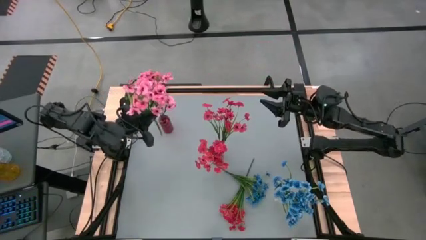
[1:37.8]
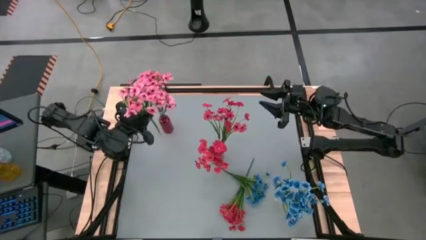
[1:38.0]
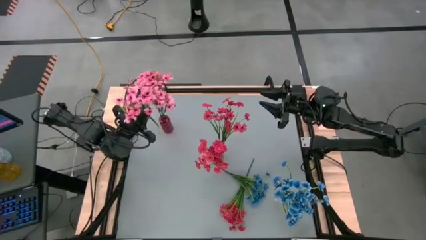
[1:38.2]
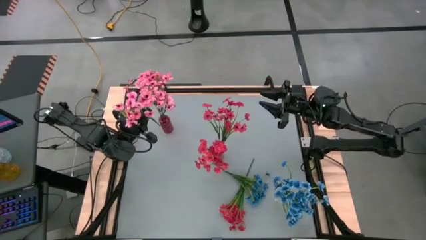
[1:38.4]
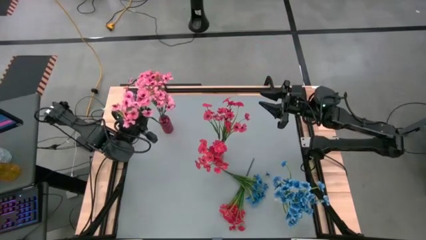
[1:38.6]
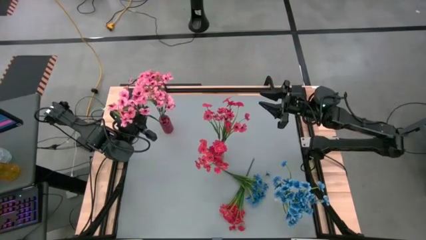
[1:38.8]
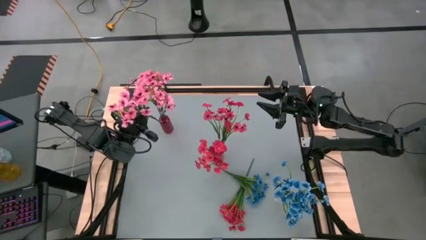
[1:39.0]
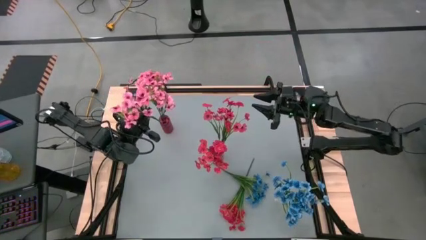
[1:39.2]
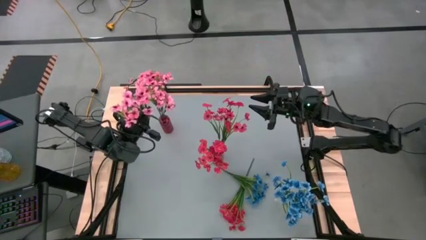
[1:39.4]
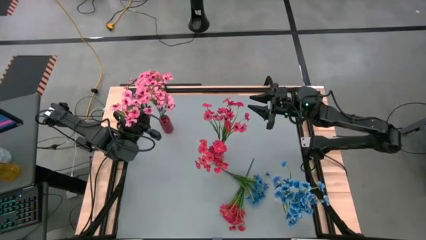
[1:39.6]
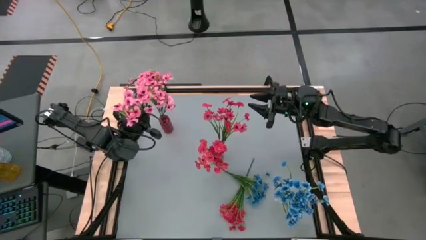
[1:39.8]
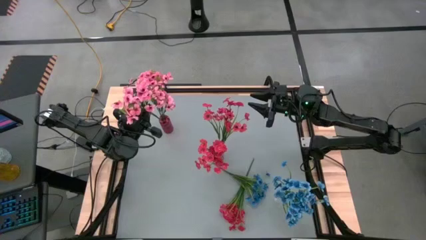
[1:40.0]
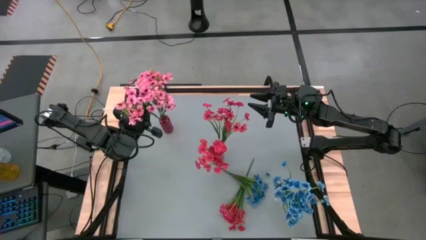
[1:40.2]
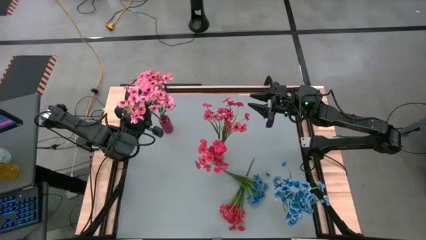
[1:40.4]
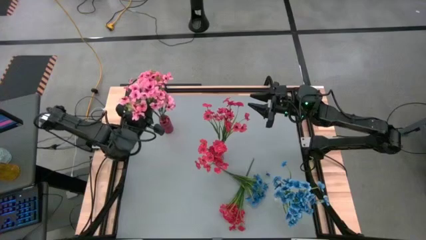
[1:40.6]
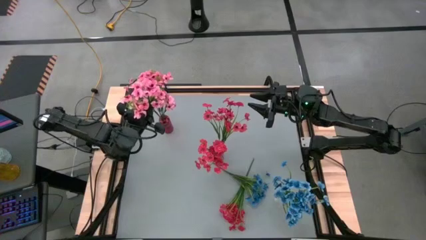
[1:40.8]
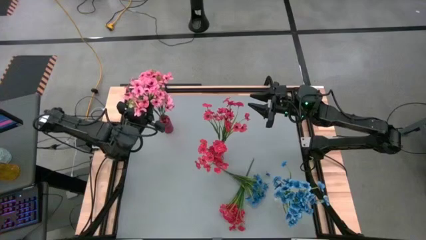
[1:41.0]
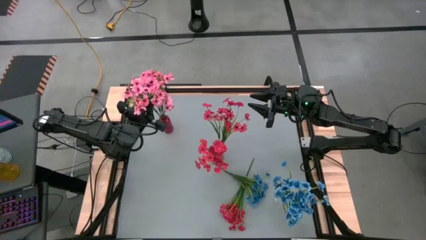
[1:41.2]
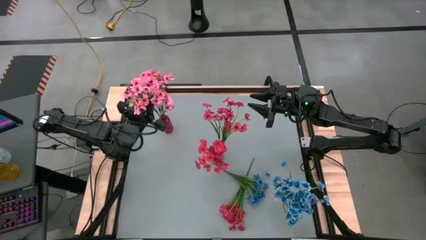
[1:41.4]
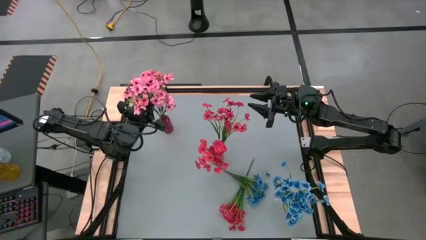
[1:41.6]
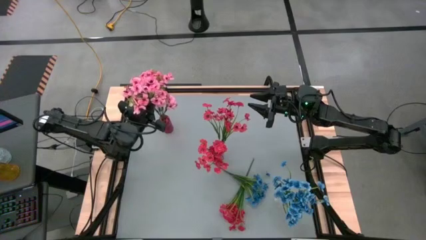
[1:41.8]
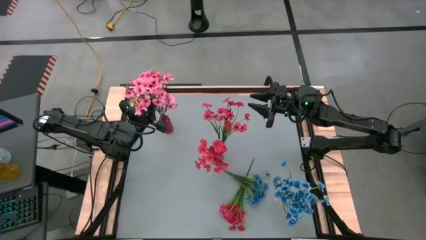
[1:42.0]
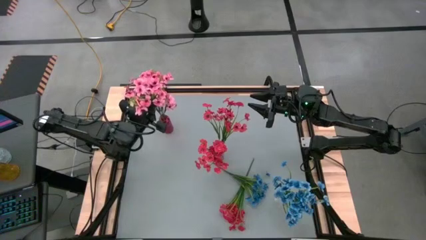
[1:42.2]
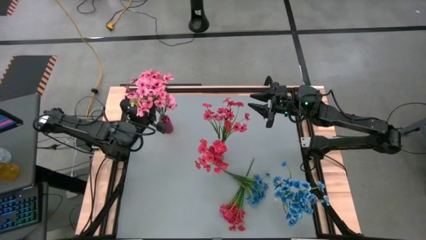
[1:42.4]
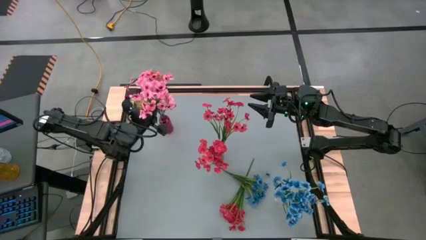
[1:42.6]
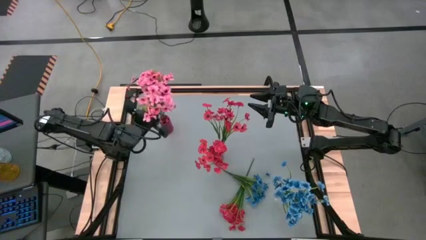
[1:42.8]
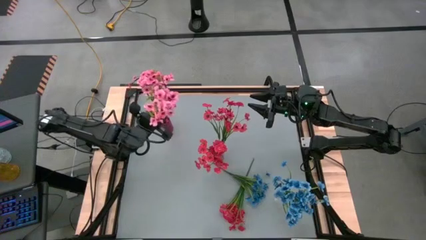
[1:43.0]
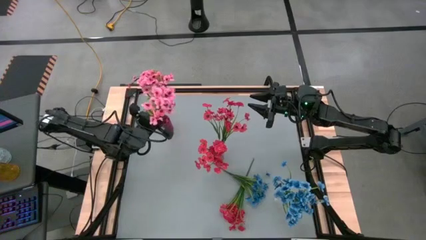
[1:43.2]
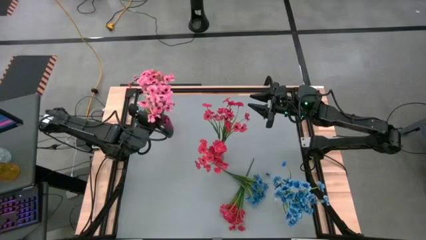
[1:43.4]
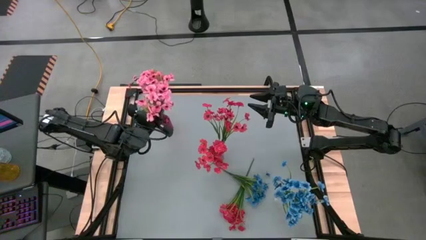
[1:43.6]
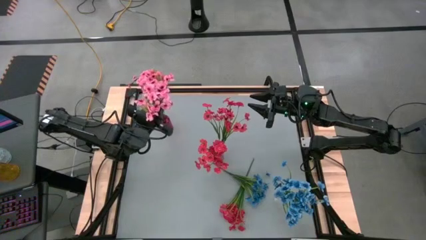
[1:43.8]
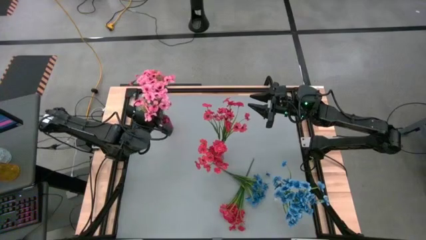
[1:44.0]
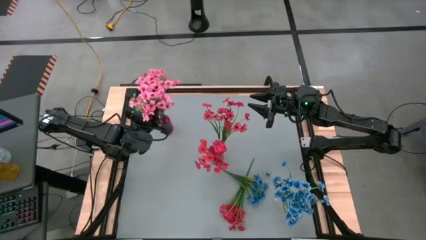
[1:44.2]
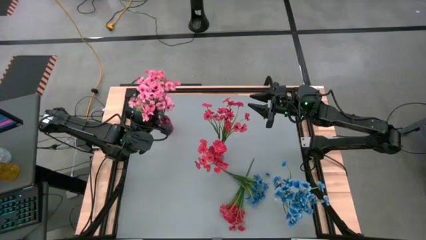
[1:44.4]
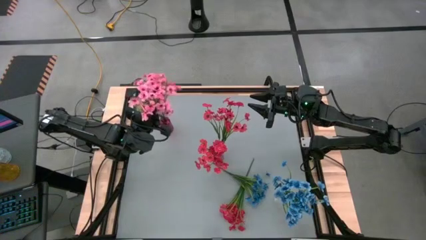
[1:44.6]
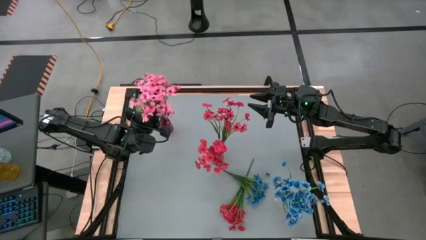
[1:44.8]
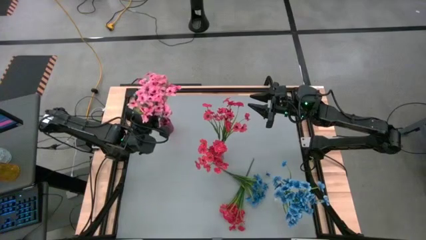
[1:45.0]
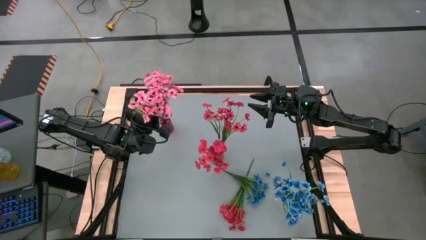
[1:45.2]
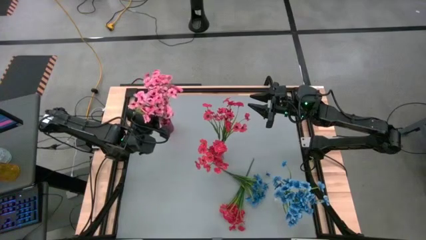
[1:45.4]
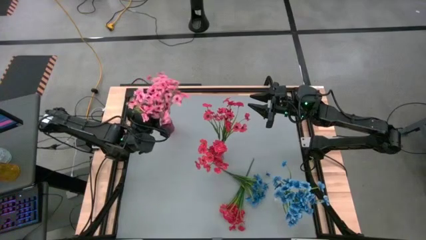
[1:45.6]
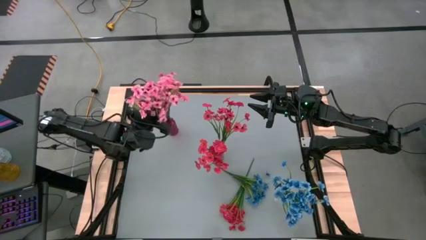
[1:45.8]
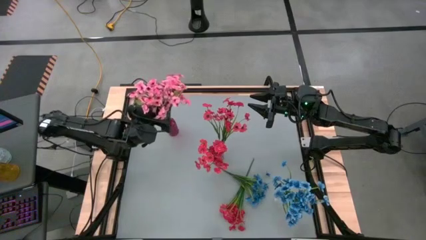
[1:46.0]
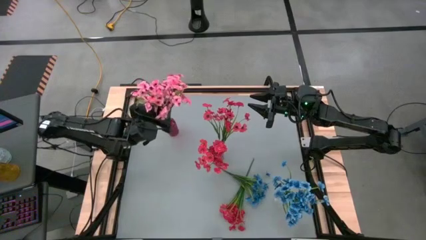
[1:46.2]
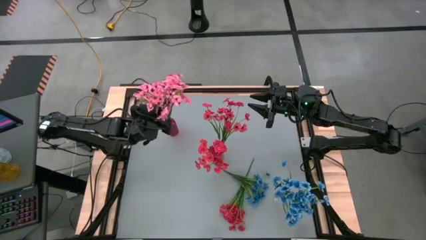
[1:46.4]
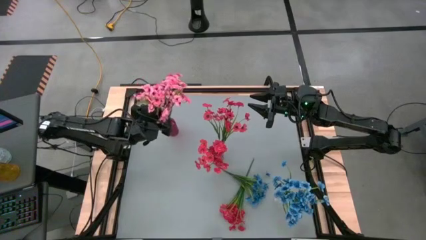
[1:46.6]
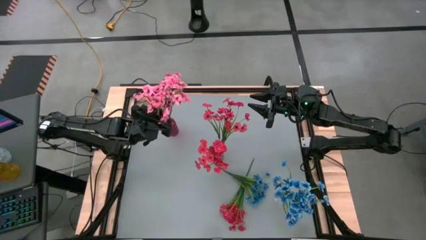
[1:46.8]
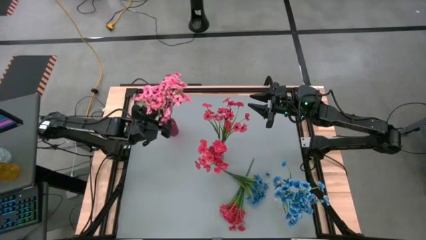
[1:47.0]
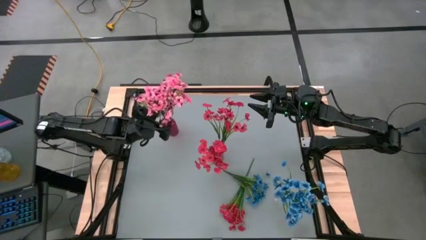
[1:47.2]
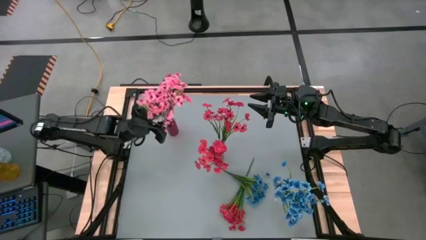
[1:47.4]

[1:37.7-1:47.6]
Task: Sort flowers into vase by color
Put the pink flowers into the red vase

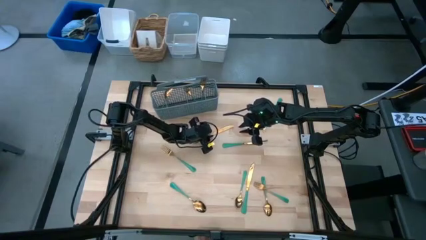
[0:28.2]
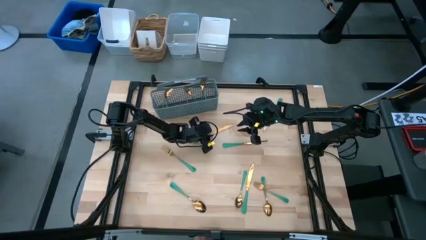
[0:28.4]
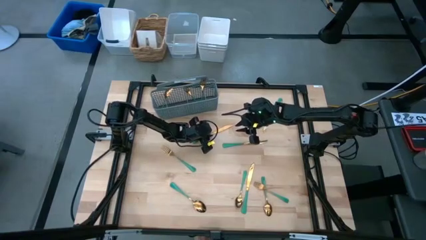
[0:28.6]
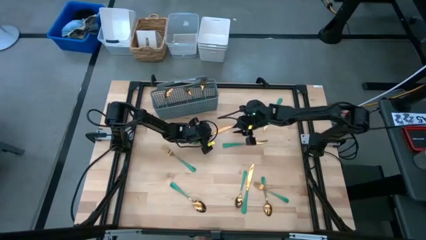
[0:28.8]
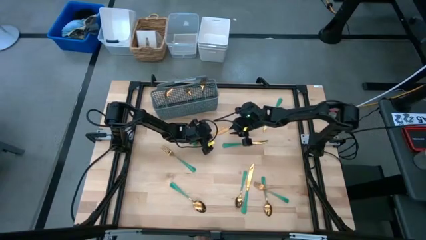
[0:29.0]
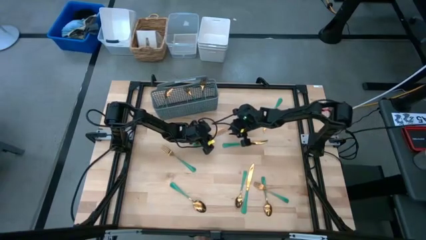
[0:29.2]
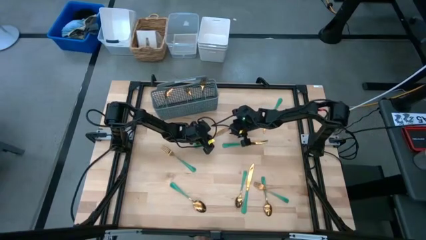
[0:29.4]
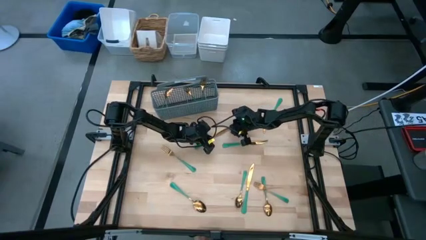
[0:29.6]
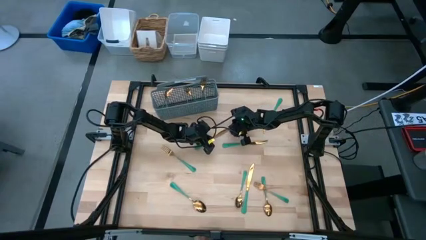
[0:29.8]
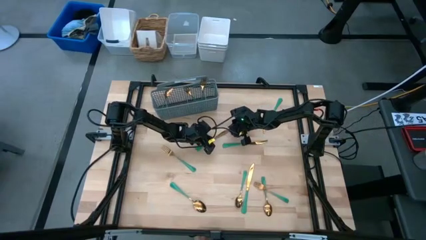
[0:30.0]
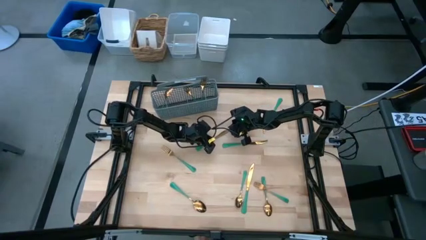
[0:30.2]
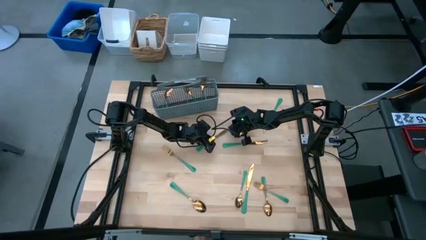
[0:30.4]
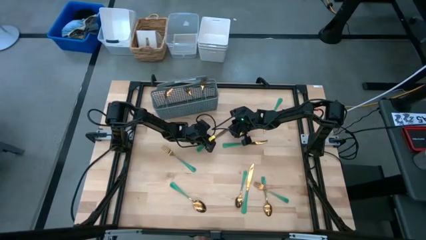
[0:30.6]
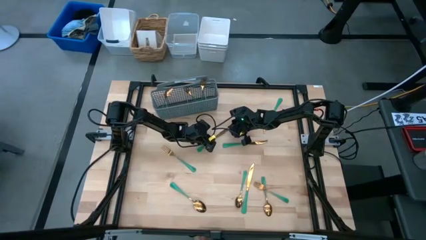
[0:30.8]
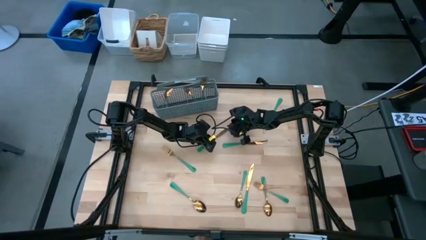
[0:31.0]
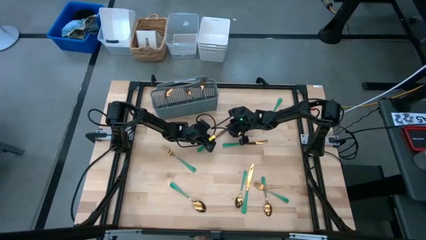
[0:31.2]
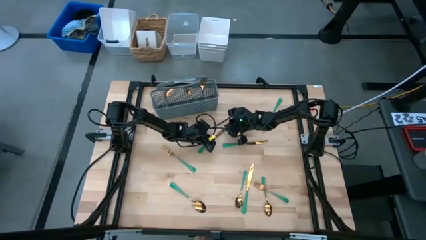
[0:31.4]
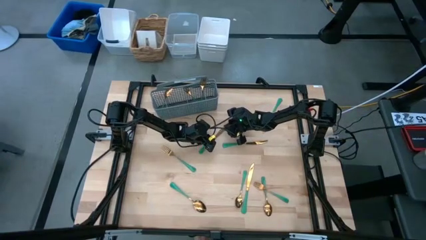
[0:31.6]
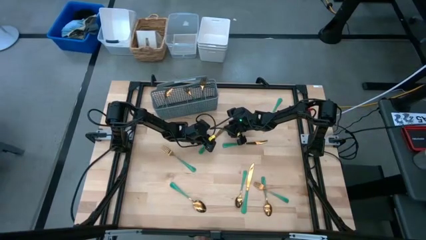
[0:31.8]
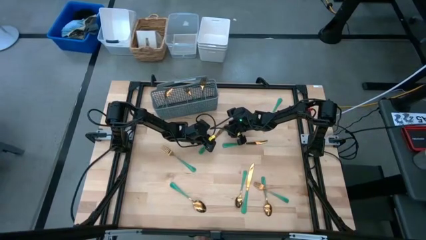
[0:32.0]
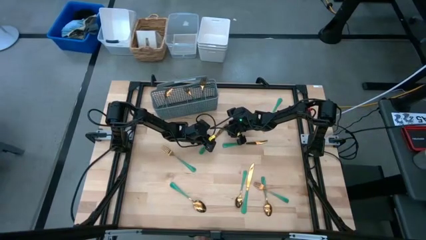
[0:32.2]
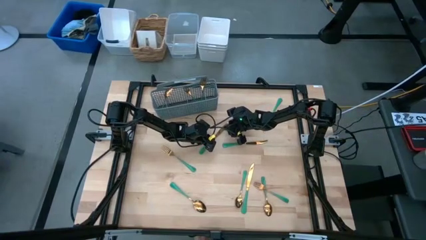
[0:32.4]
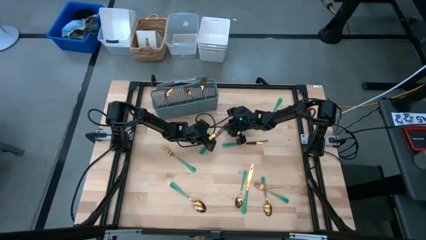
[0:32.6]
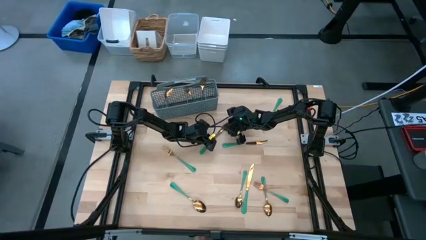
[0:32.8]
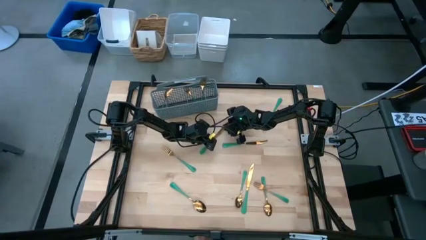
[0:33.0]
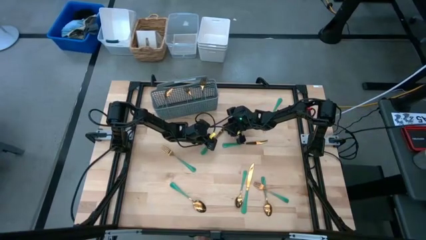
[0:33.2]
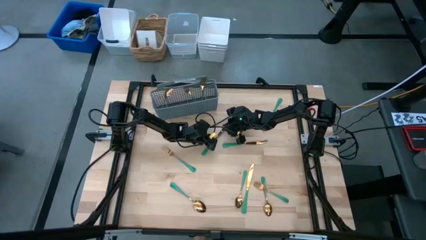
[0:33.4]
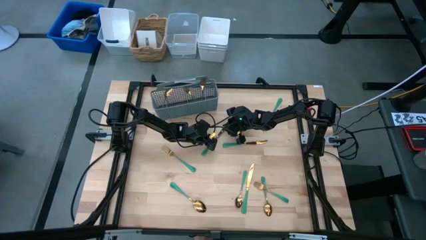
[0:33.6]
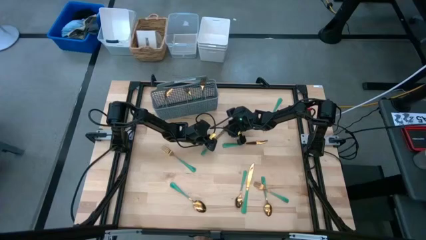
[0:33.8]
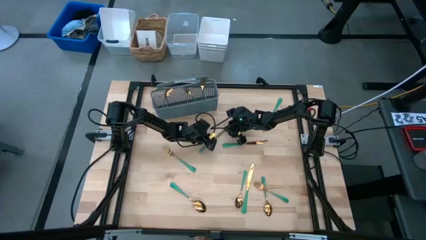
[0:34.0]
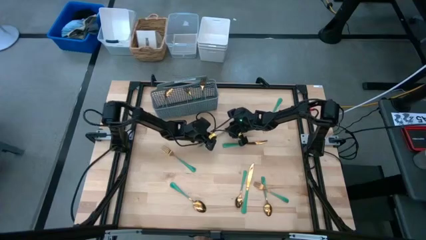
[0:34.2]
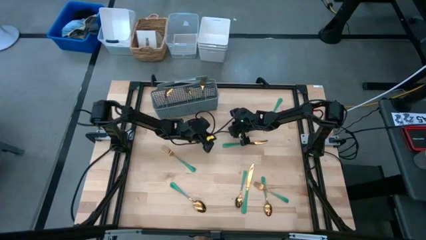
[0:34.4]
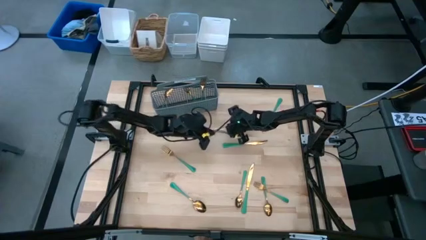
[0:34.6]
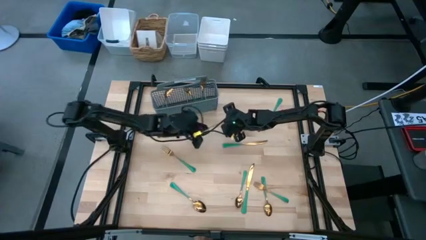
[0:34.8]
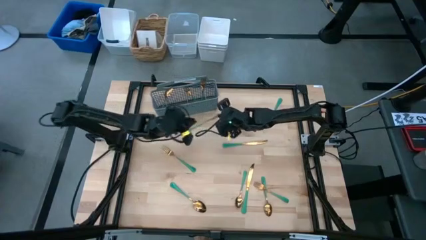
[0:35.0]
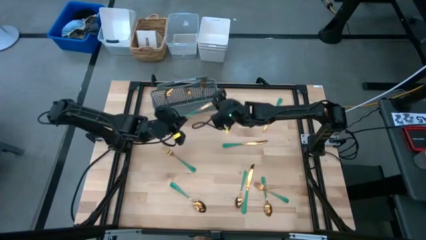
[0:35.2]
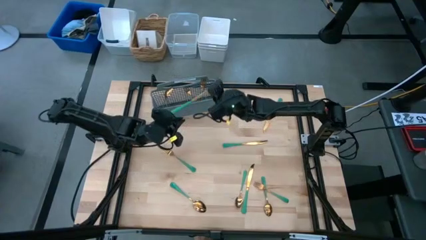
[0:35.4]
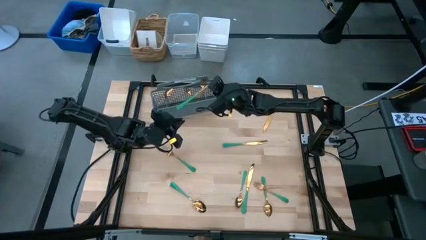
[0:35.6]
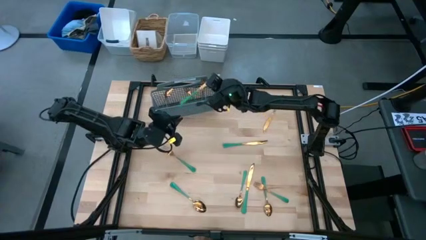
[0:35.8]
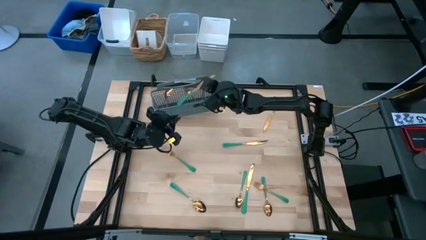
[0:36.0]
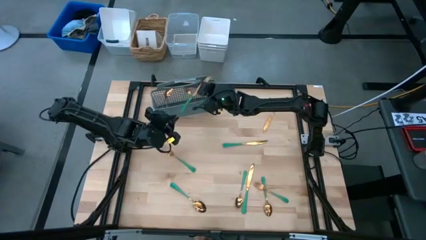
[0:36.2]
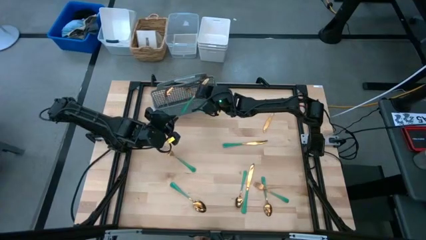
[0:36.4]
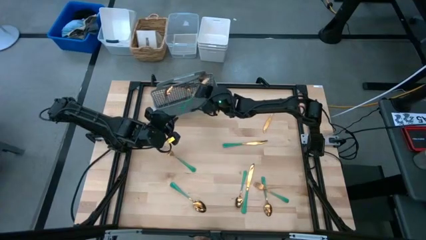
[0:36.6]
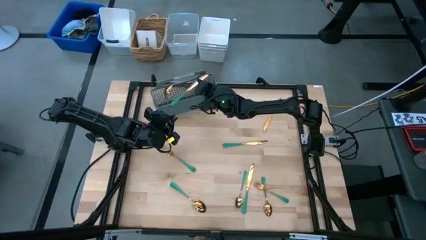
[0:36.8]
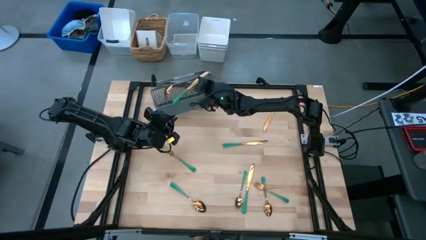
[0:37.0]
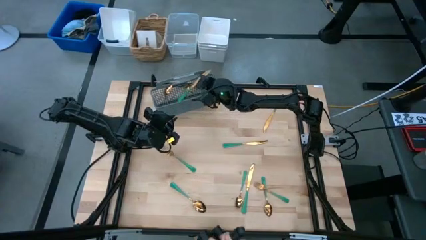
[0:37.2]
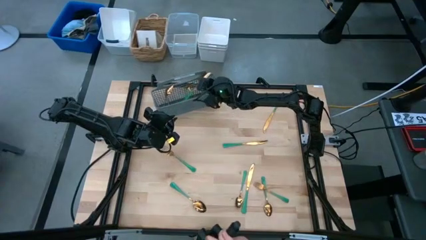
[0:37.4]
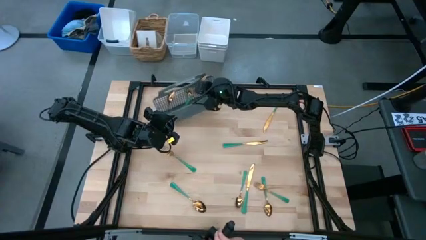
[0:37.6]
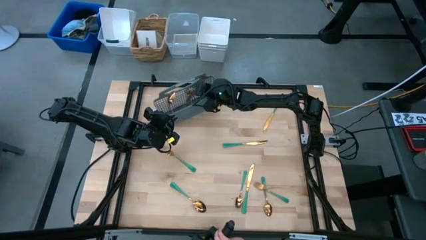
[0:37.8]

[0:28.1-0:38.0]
Task: Sort silverware
Put the knife into the middle left section of the silverware holder
